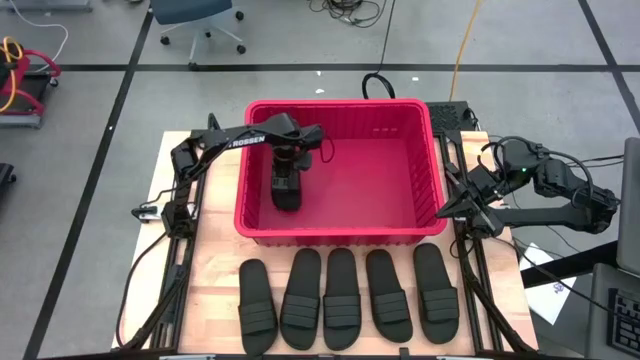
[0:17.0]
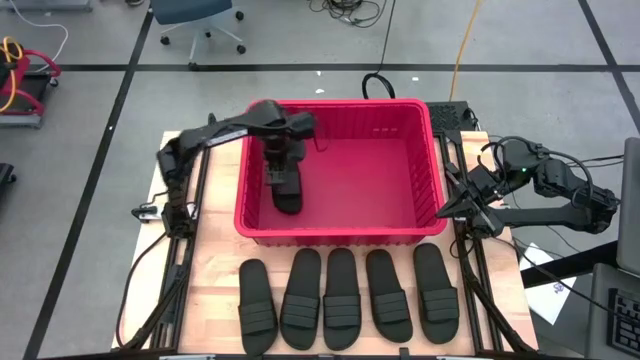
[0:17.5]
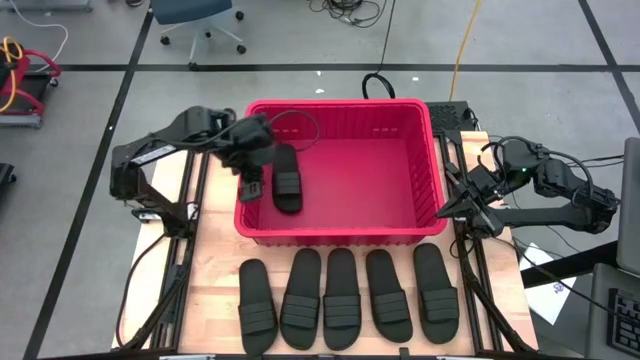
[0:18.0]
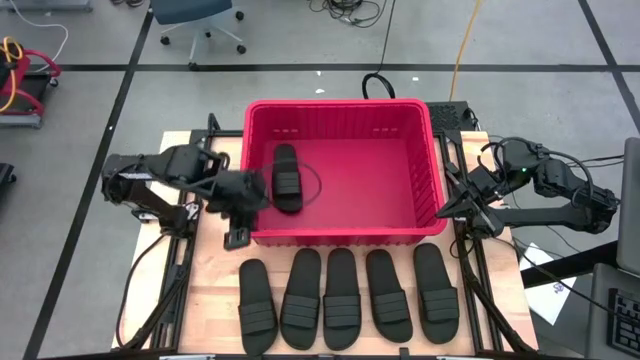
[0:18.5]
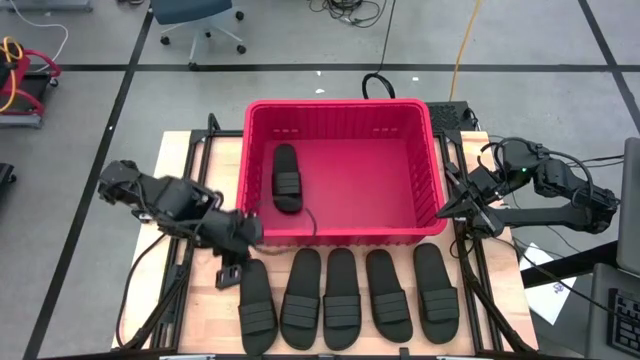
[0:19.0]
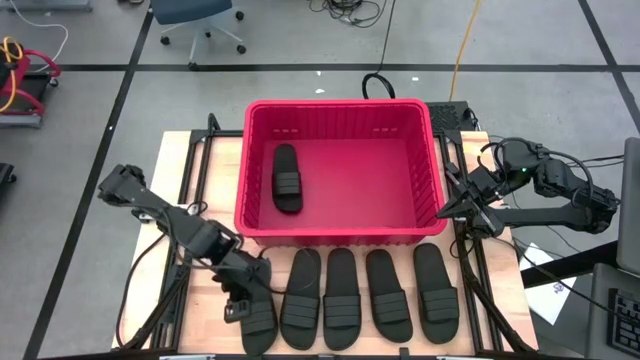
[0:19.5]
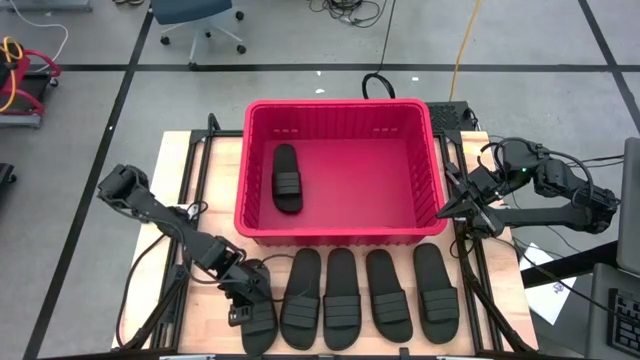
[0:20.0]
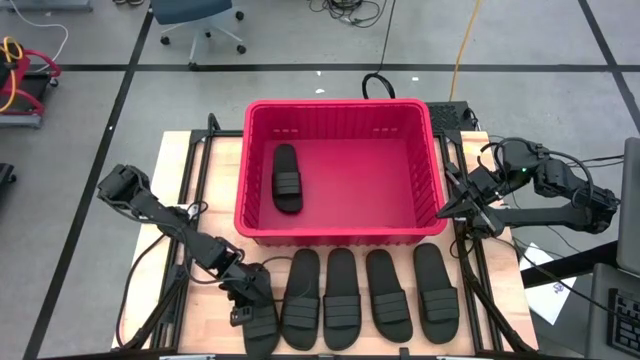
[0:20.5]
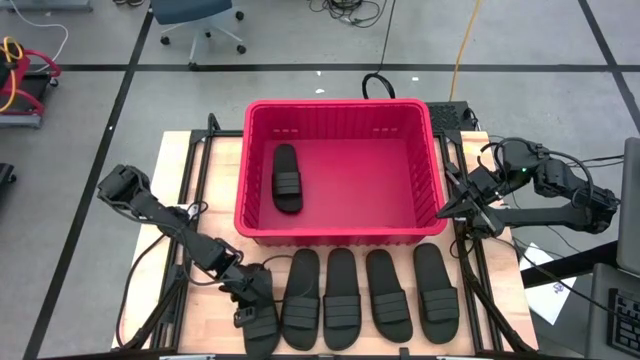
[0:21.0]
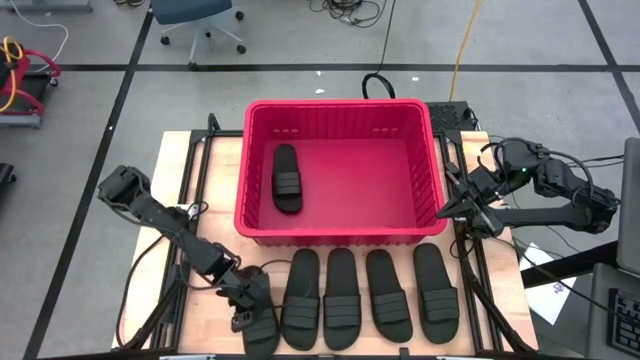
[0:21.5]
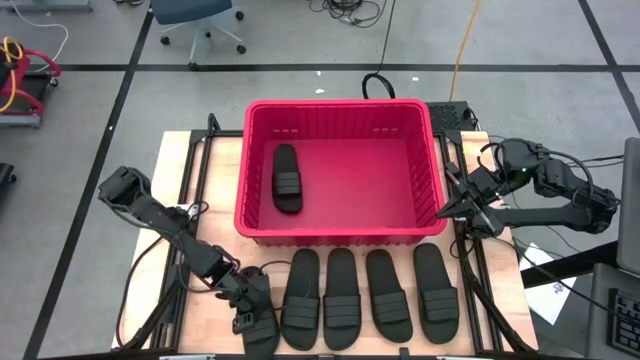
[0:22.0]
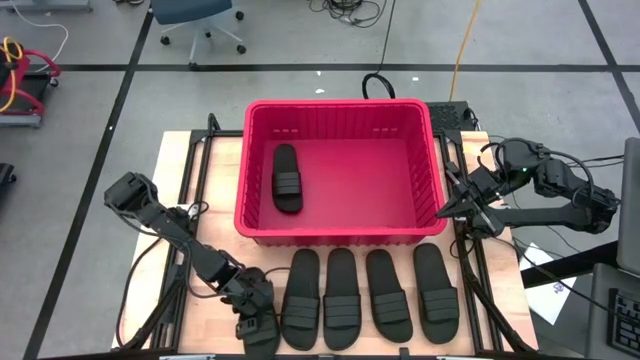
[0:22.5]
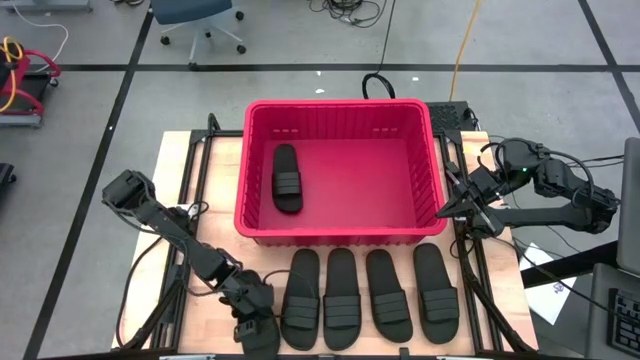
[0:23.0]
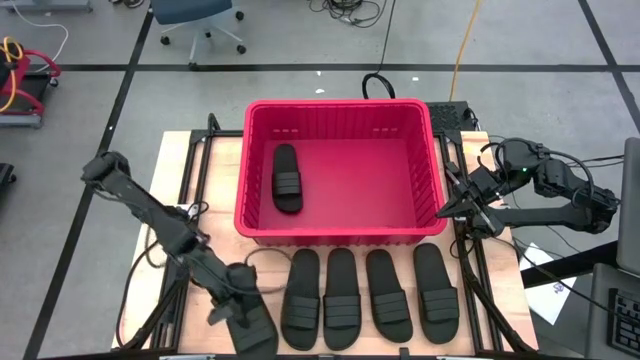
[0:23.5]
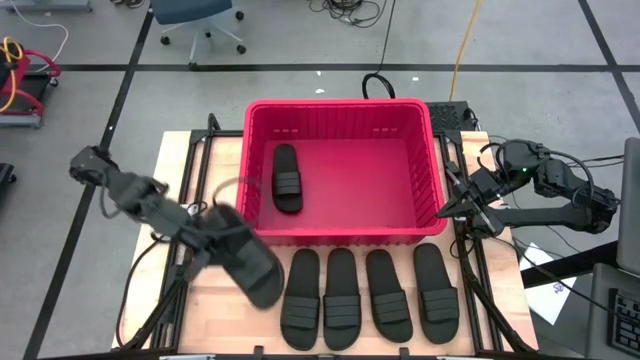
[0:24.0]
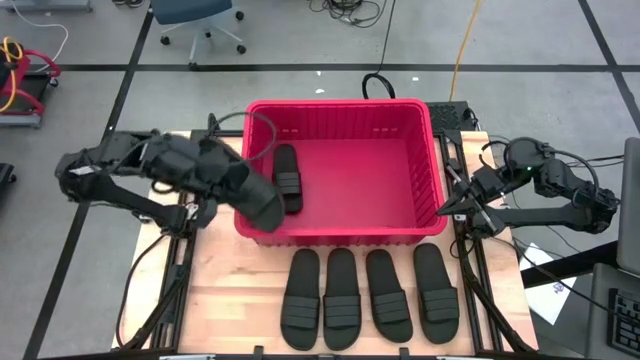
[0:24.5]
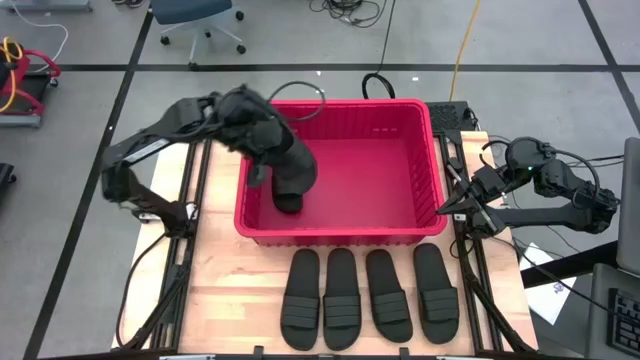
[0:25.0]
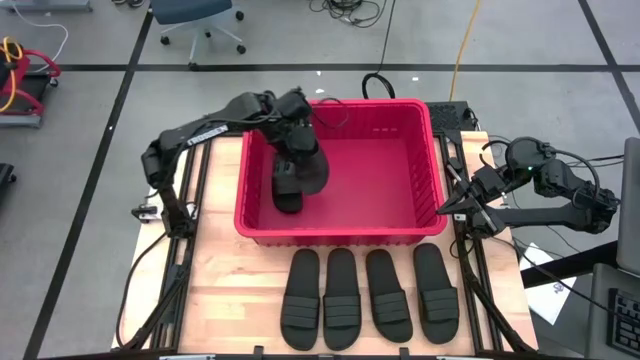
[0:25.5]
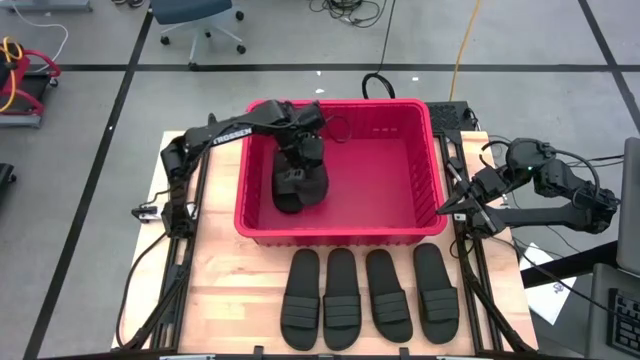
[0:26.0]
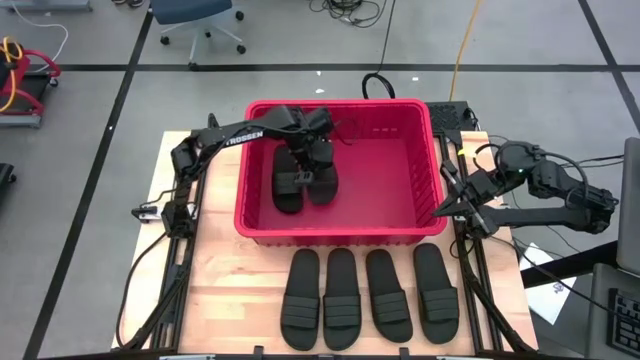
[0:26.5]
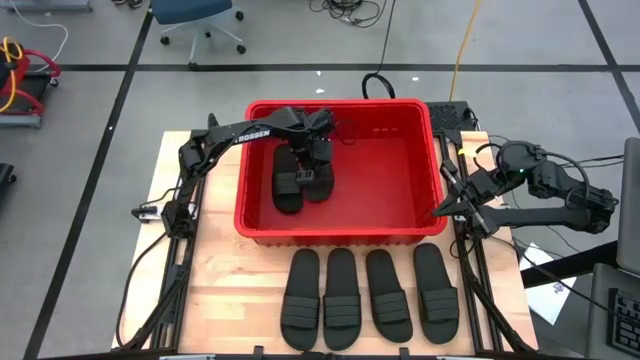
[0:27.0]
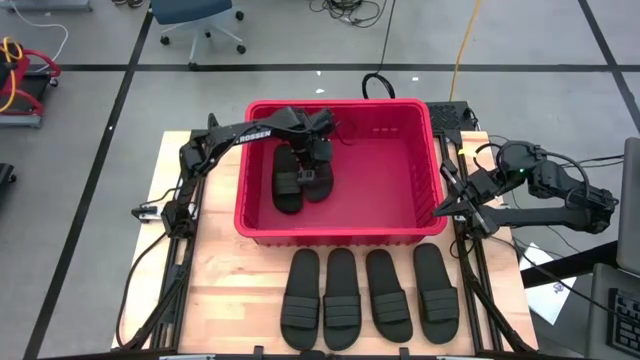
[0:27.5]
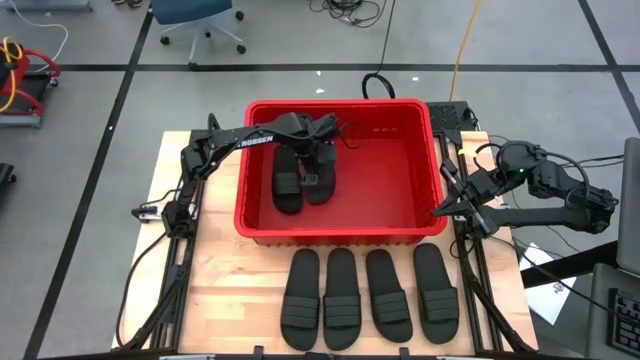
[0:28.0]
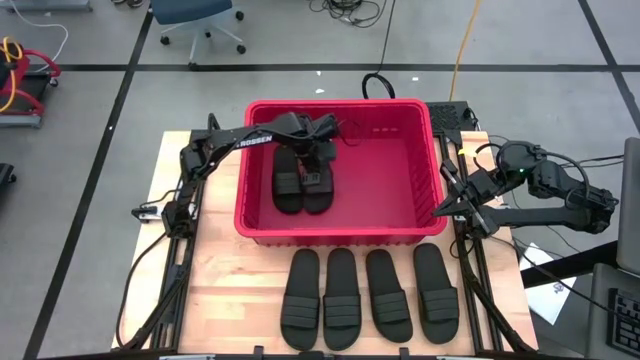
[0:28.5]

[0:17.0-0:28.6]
Task: Pick and place slides into bin
Put the black slide into the red bin

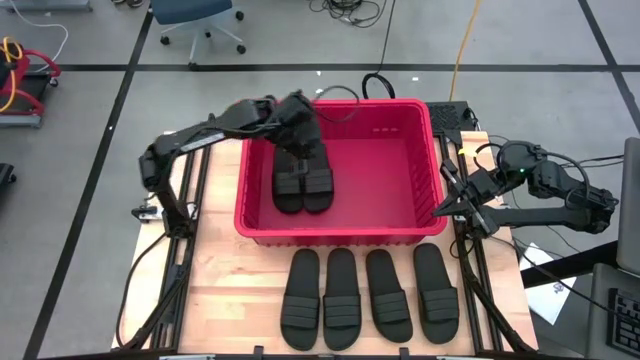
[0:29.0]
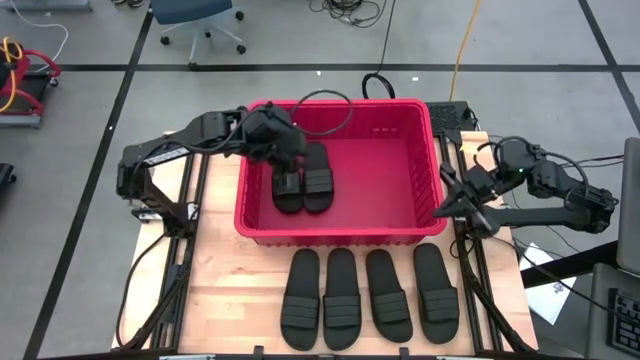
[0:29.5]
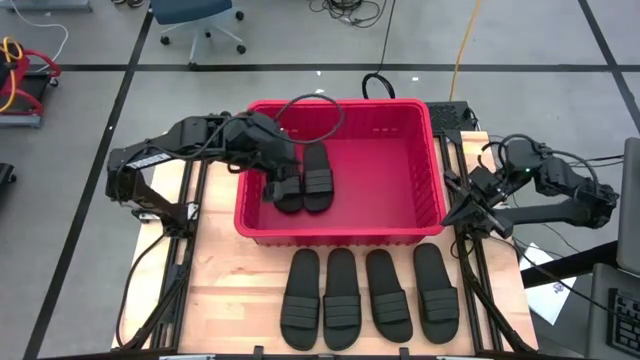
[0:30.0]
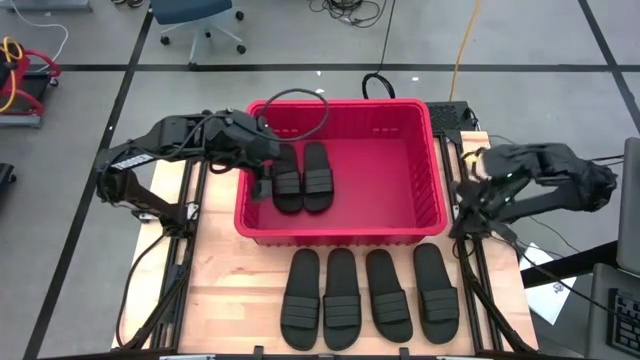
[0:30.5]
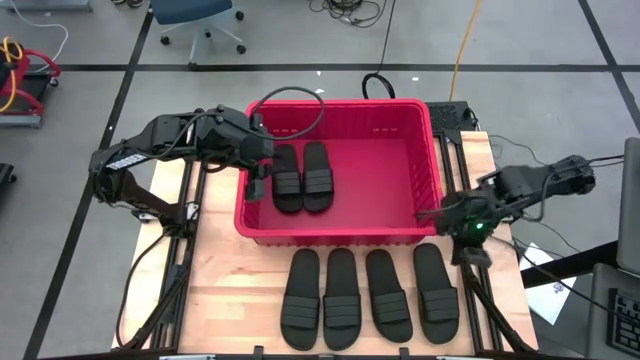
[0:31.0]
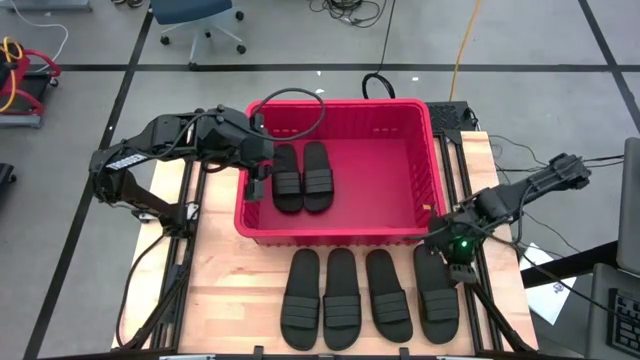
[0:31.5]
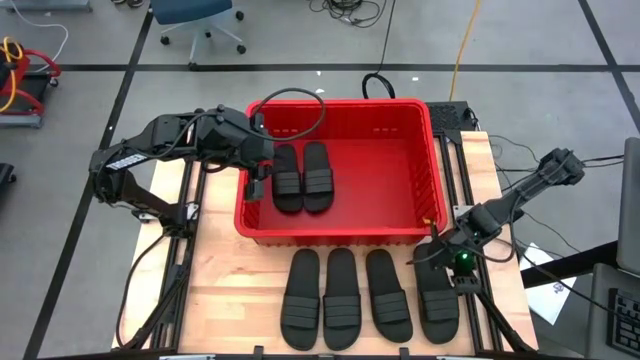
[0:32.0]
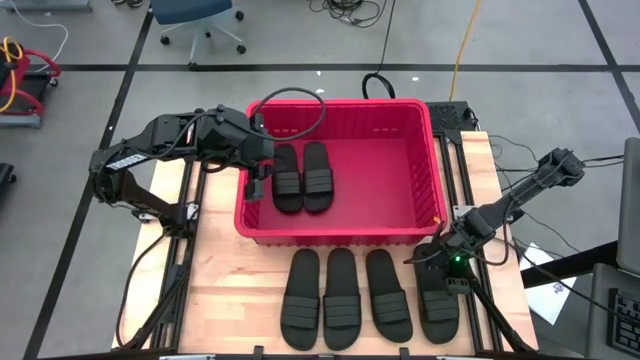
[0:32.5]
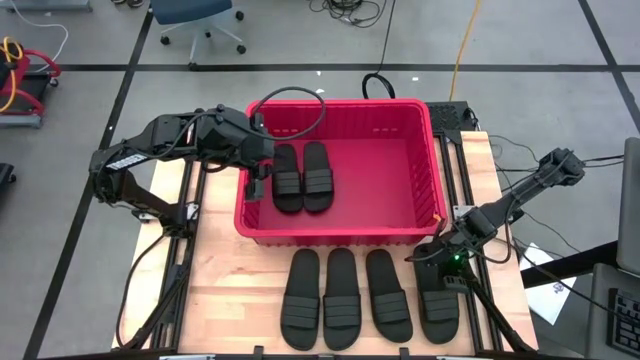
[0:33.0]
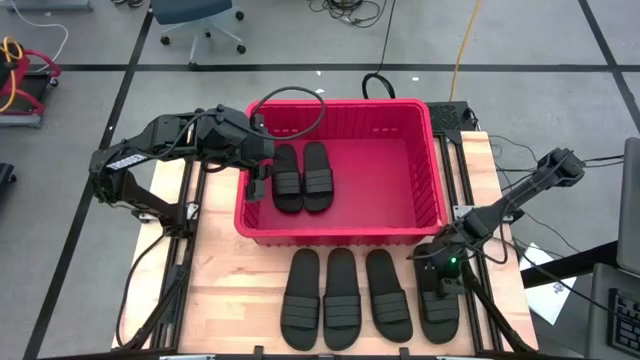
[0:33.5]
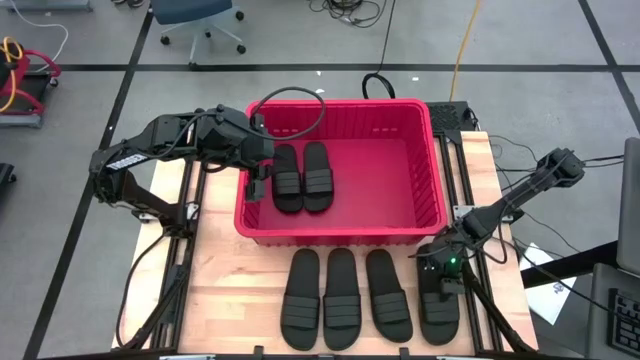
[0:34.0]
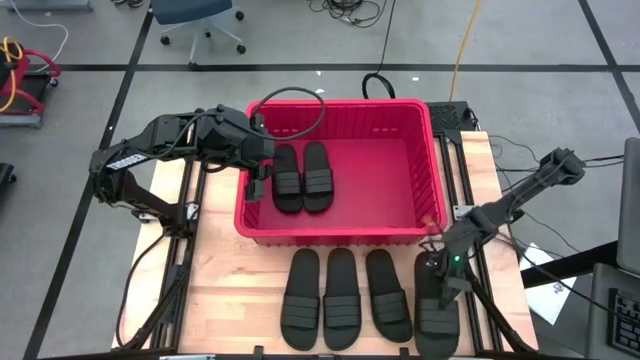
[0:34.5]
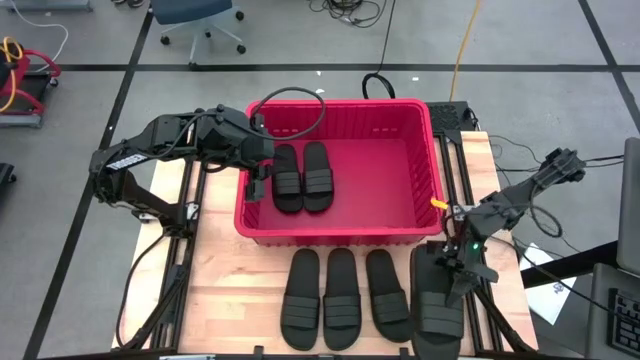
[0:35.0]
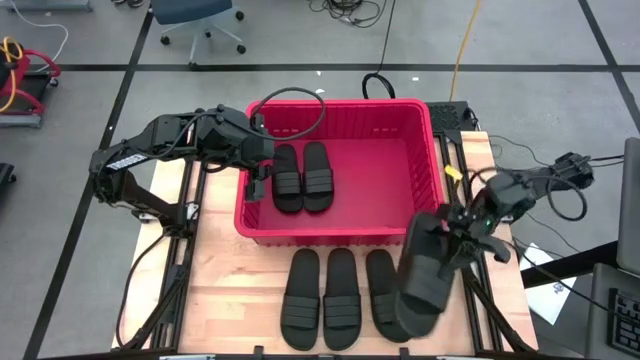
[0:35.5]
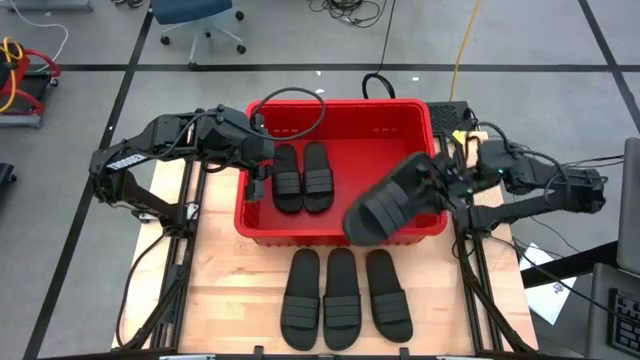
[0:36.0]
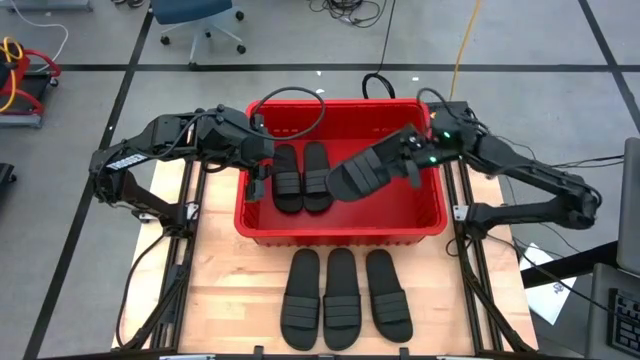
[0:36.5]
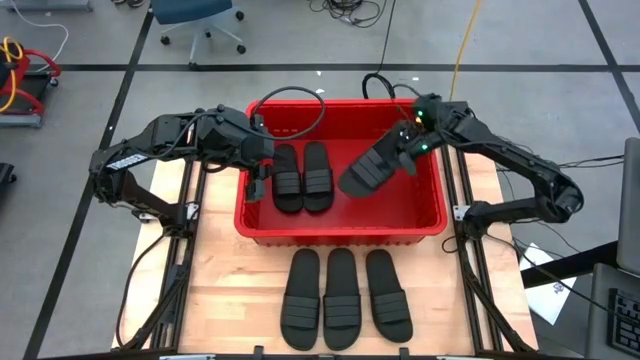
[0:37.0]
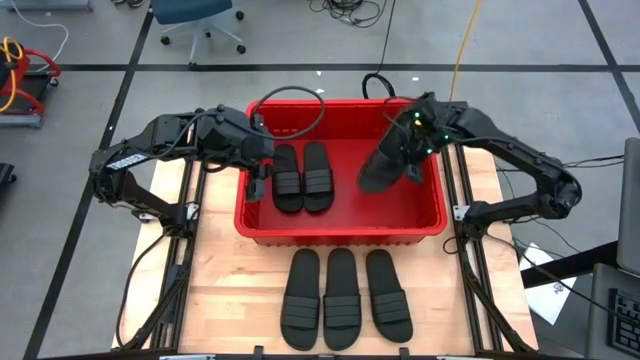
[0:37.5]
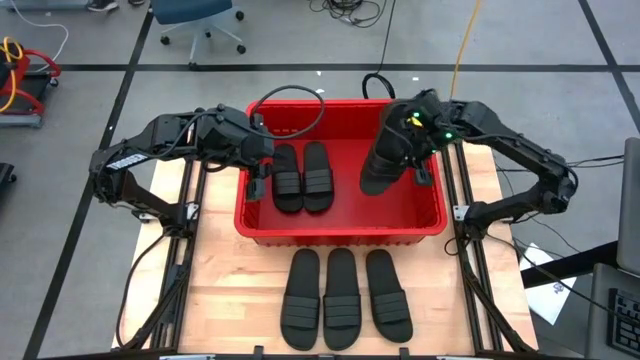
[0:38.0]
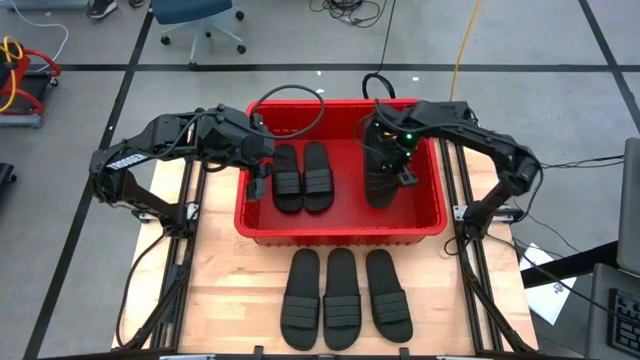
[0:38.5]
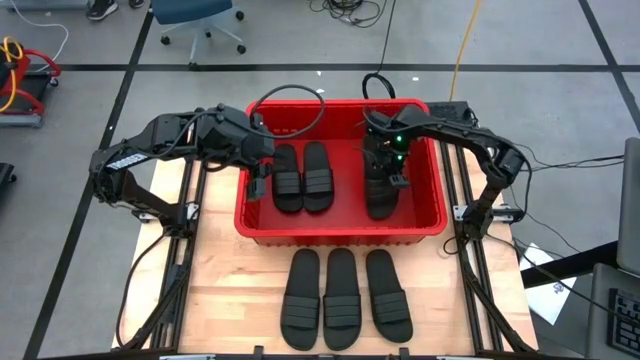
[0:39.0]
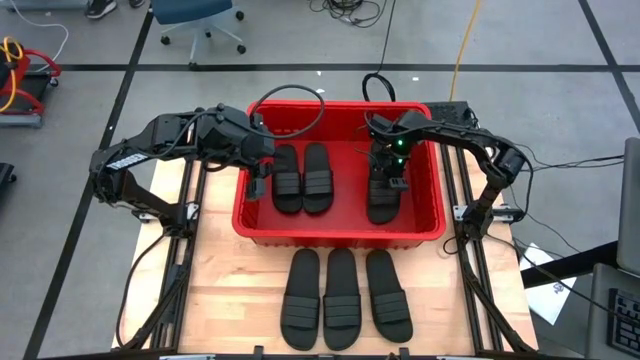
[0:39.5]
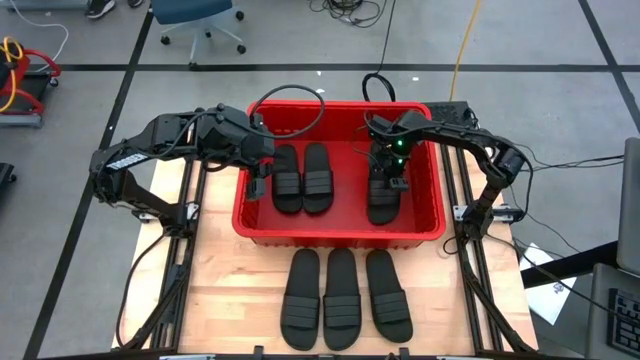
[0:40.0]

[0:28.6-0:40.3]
Put the black slide into the red bin
